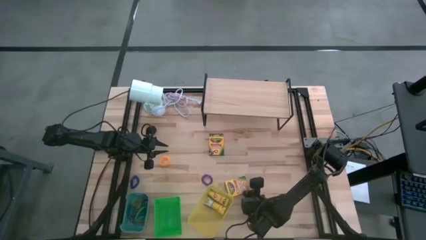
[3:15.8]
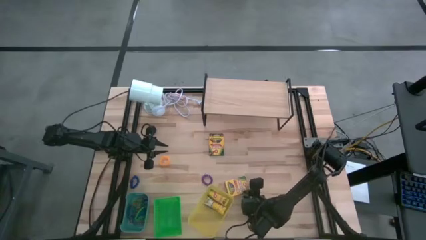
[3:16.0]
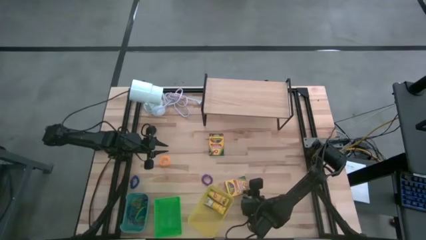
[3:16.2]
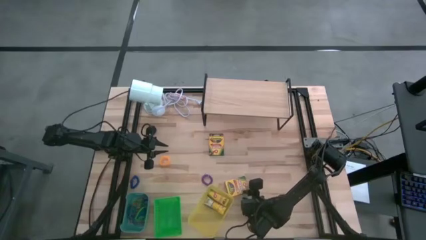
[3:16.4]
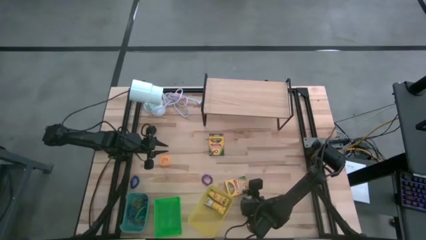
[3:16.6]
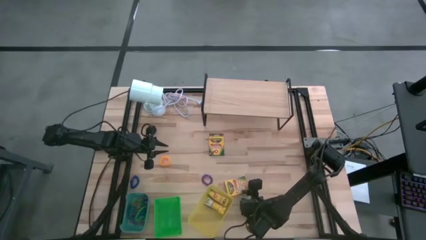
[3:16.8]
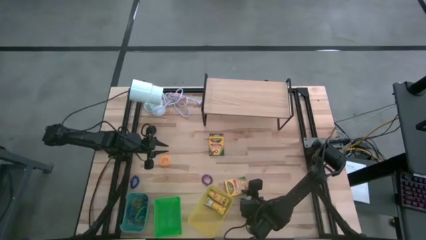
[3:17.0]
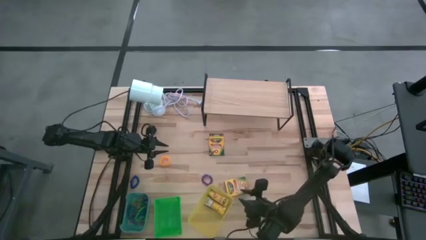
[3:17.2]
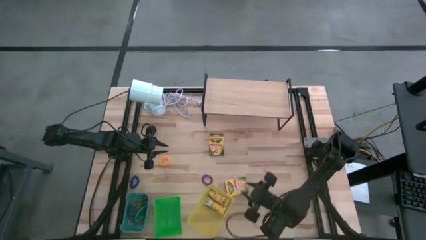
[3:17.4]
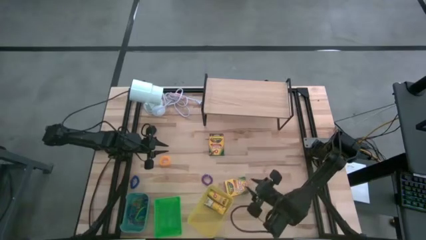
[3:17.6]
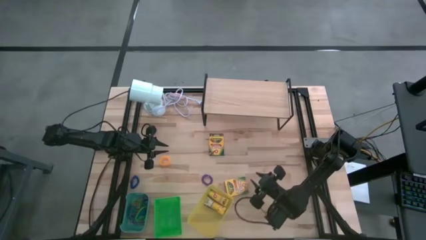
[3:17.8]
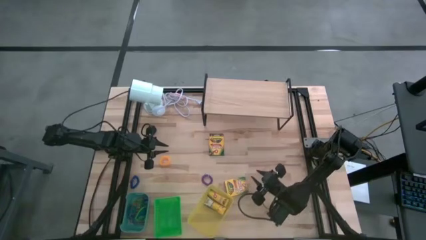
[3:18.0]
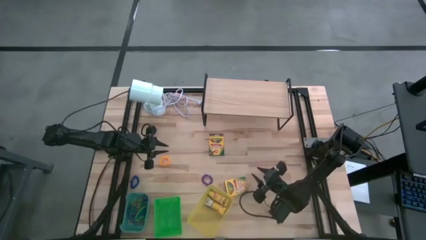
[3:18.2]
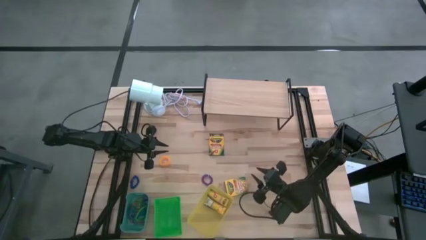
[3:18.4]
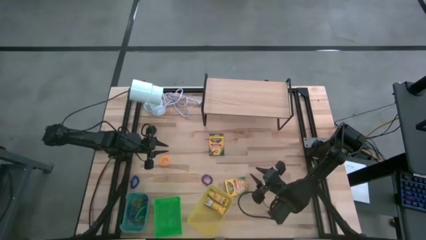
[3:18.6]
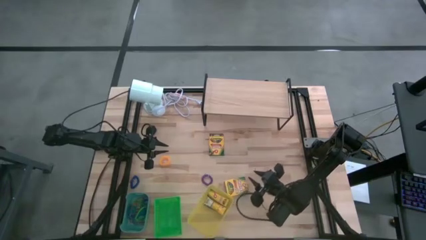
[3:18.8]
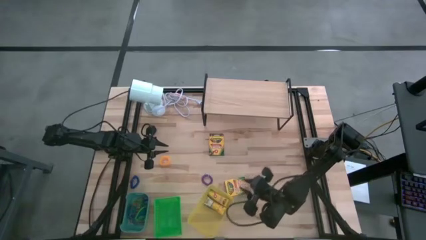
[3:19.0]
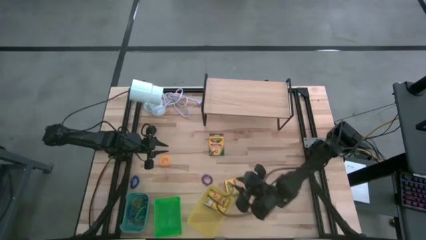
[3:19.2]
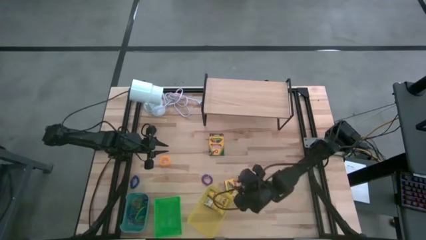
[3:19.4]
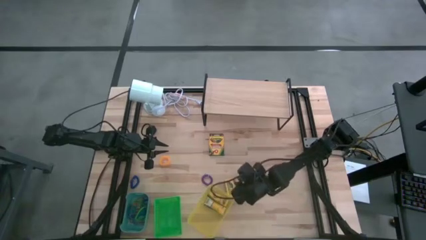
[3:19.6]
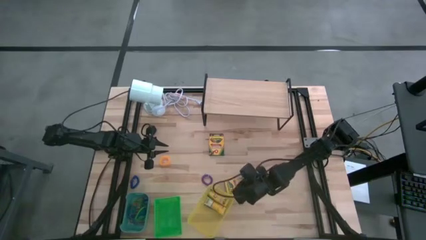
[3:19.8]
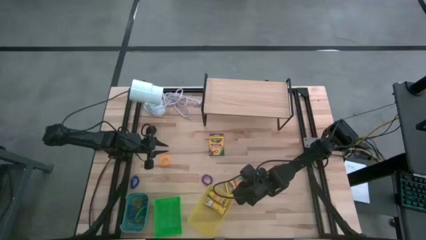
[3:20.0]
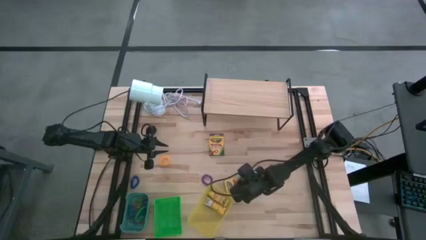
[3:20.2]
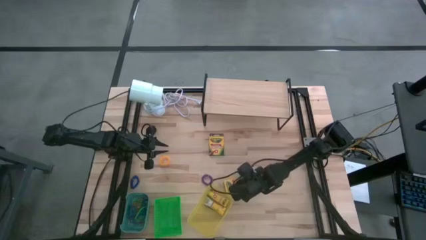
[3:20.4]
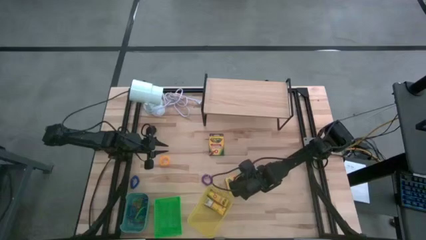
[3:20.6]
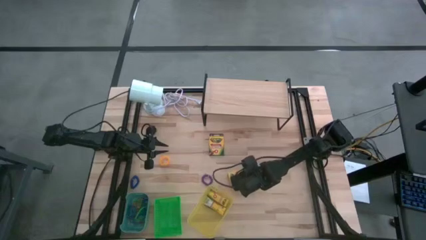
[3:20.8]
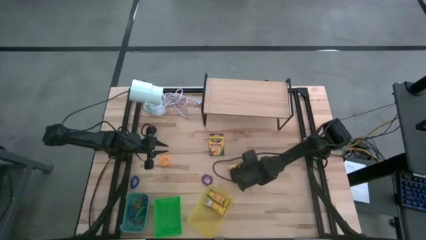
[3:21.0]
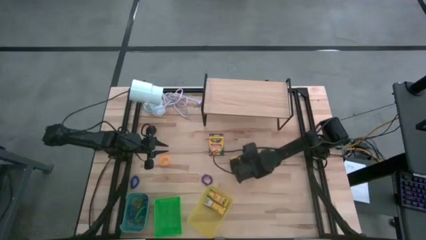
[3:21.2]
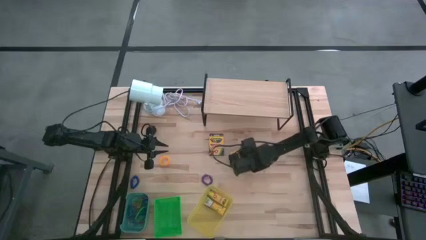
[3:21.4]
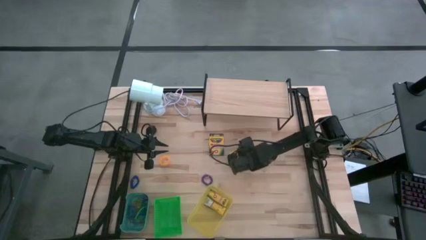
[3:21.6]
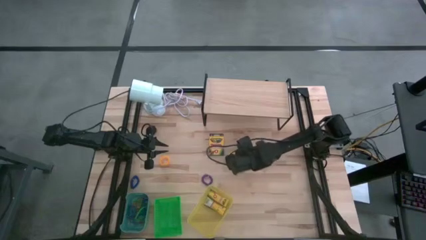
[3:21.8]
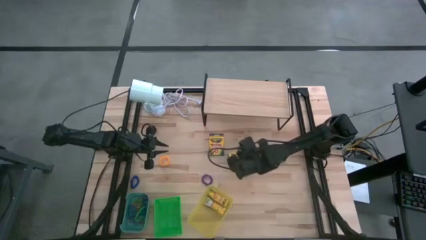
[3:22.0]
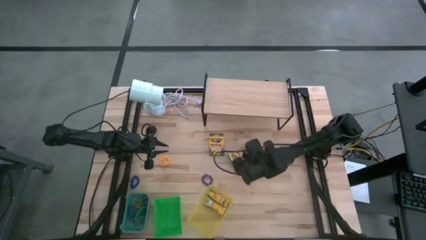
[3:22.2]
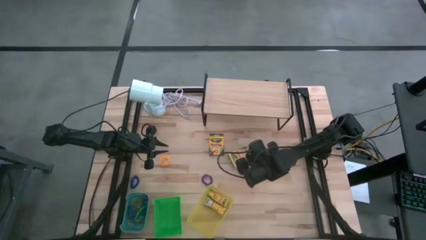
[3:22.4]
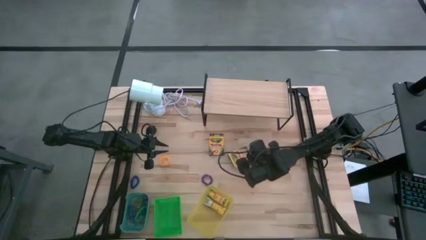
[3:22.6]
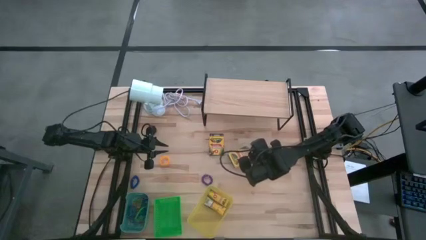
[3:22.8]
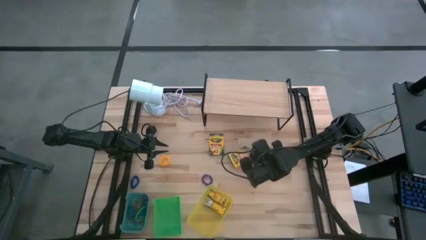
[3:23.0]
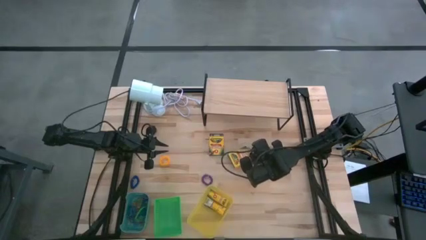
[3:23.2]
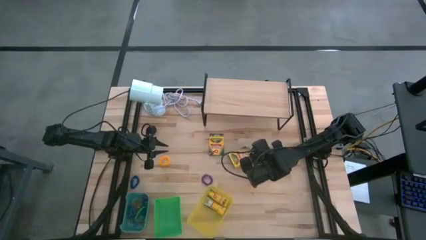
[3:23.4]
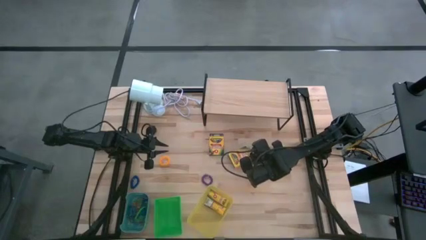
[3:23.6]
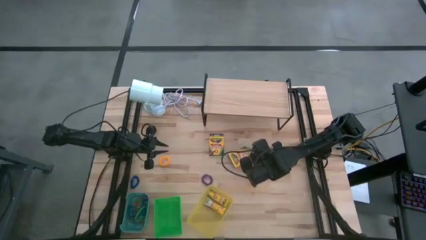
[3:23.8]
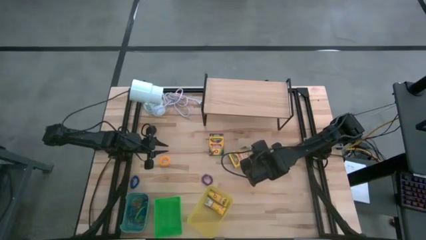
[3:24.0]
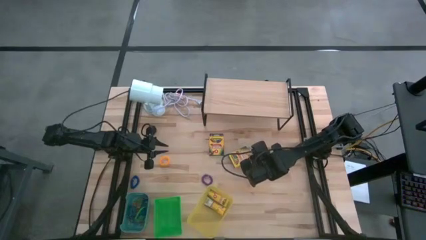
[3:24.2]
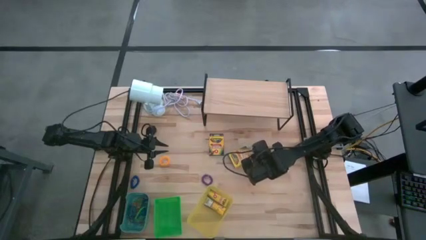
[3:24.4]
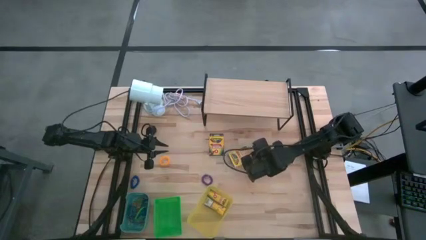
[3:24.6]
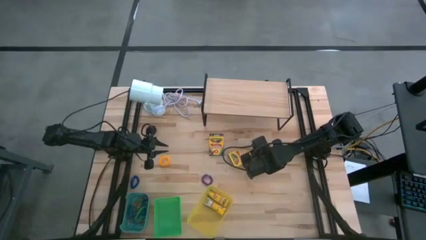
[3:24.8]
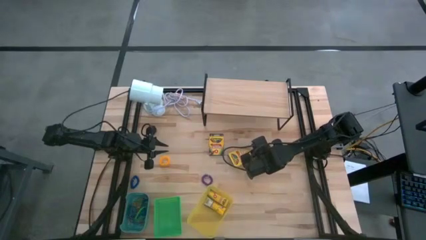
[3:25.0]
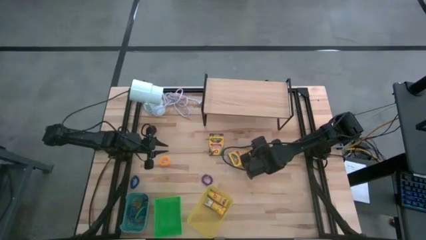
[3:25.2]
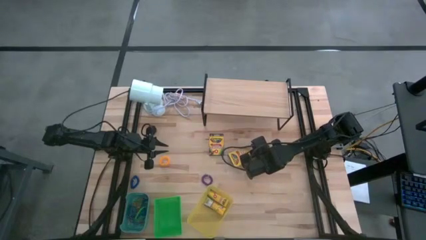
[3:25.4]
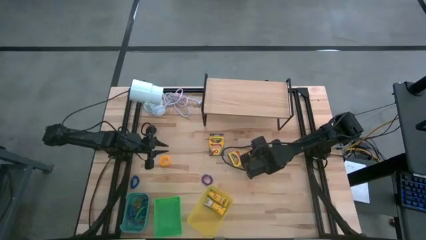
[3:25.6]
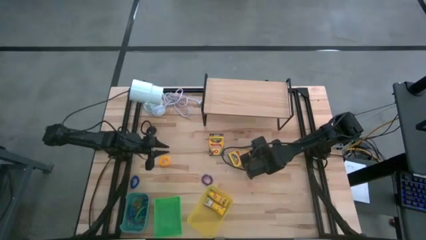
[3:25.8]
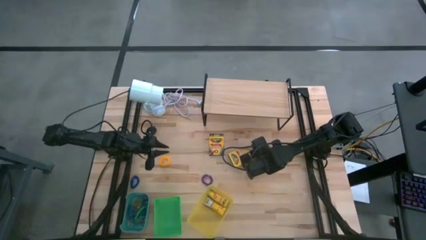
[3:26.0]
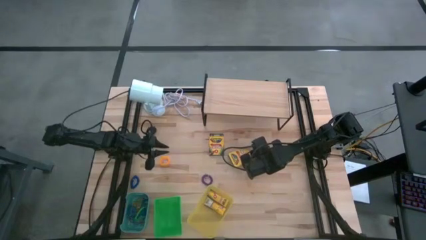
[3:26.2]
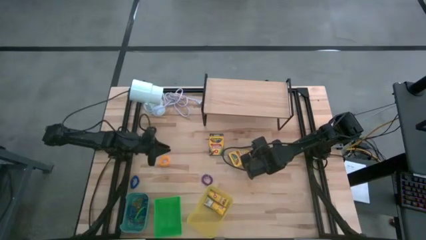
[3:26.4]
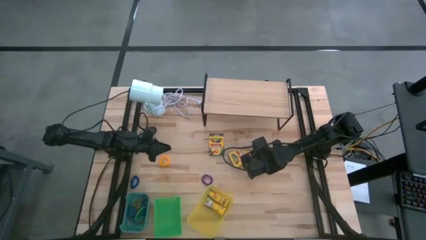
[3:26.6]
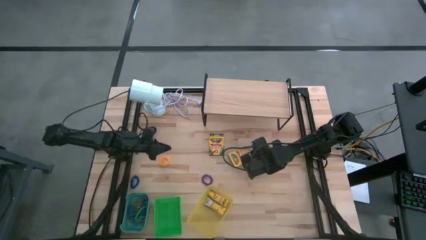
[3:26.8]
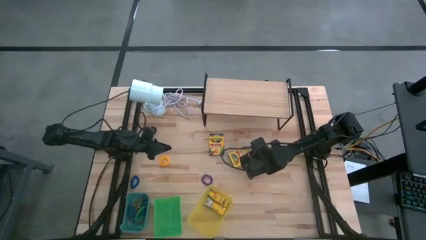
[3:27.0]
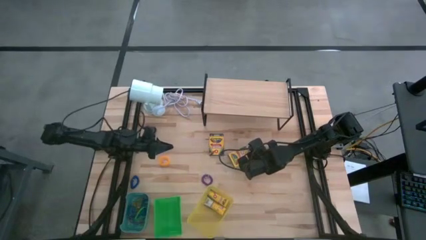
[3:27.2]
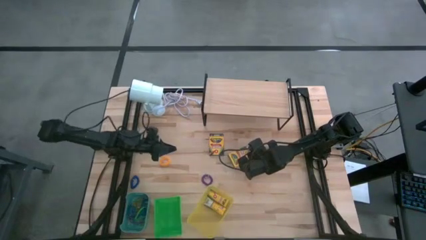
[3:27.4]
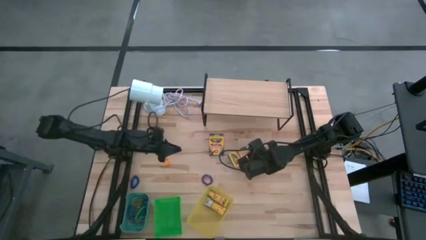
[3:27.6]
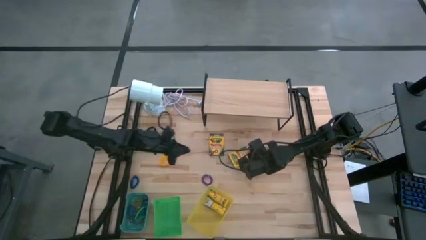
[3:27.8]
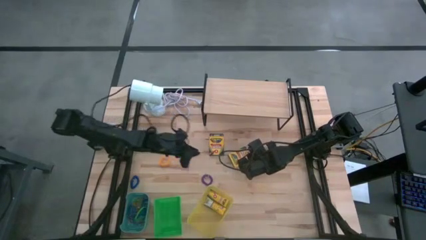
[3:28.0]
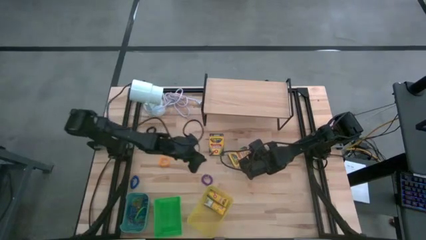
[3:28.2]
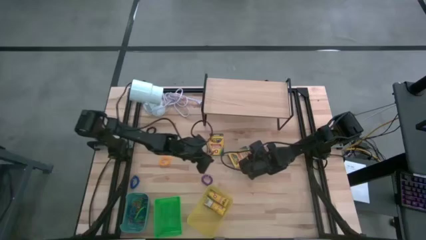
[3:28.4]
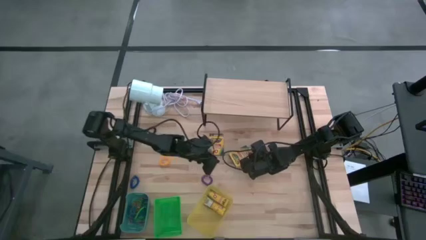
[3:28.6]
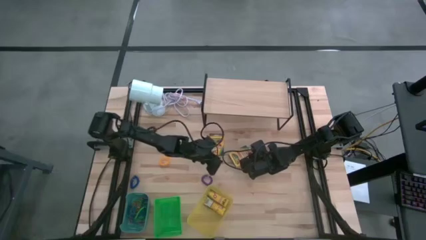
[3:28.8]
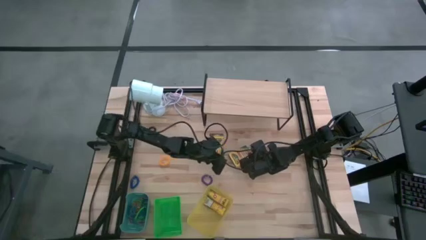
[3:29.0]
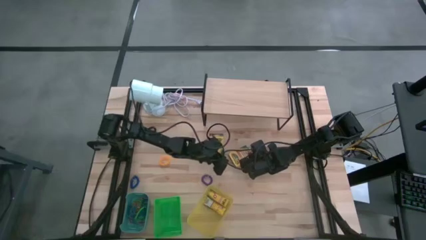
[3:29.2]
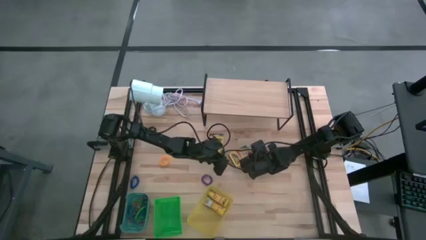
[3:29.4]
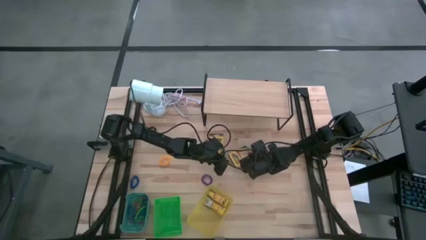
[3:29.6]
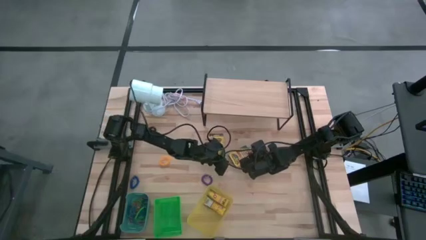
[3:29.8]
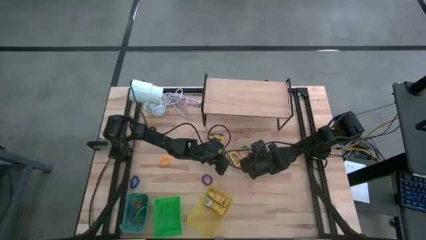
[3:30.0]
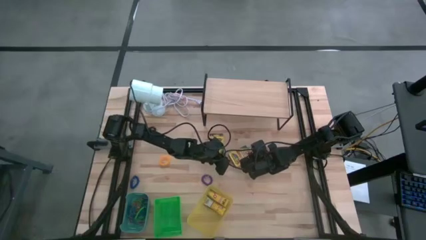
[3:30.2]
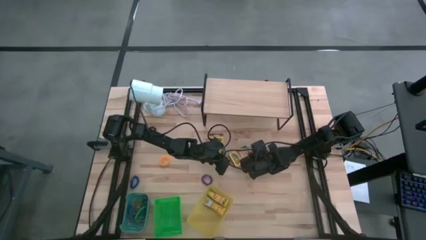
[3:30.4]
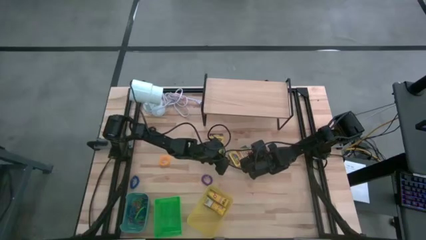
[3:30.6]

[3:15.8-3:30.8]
Task: Pick & Place Office Desk Supplies
Put the crayon box into the yellow bin
